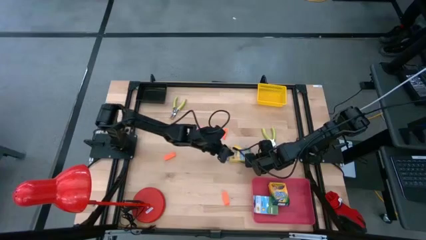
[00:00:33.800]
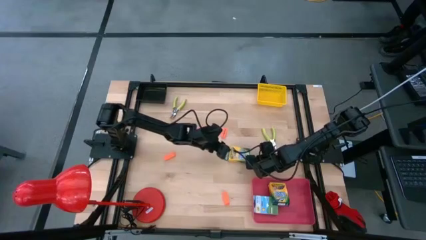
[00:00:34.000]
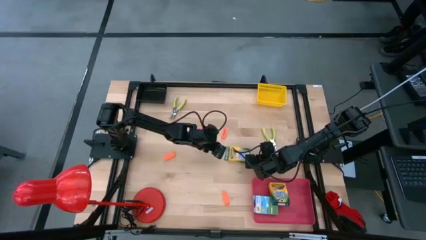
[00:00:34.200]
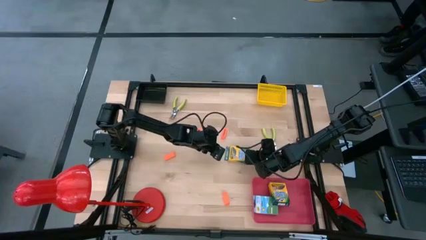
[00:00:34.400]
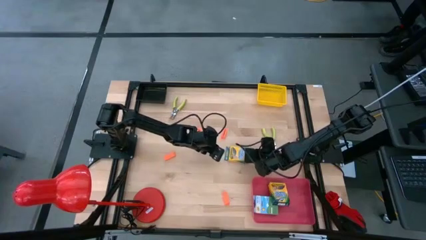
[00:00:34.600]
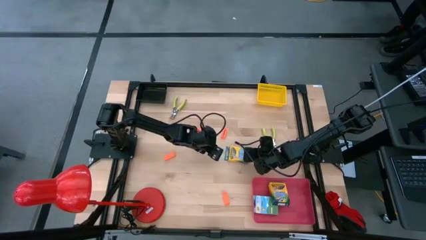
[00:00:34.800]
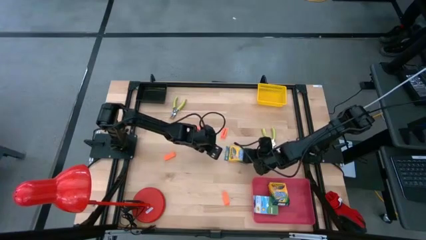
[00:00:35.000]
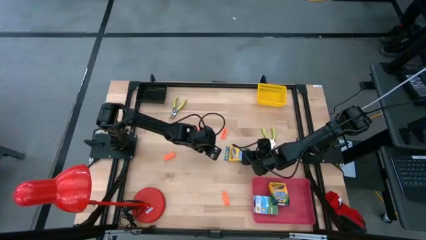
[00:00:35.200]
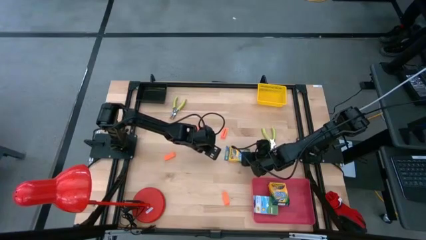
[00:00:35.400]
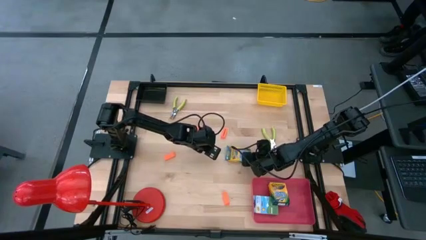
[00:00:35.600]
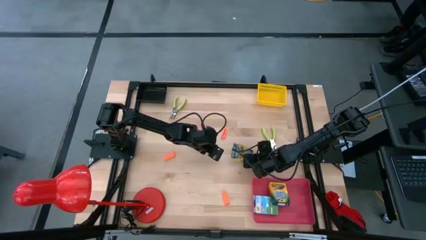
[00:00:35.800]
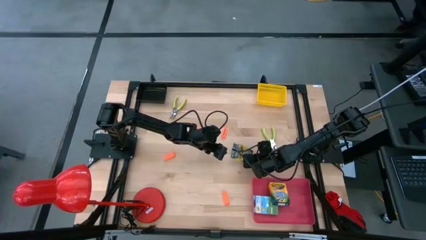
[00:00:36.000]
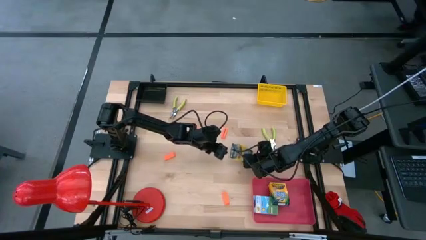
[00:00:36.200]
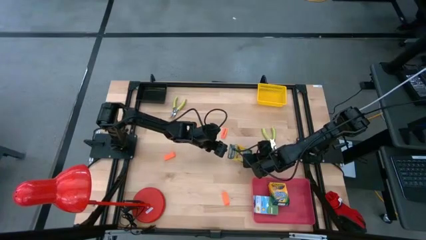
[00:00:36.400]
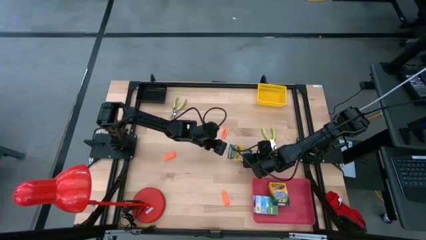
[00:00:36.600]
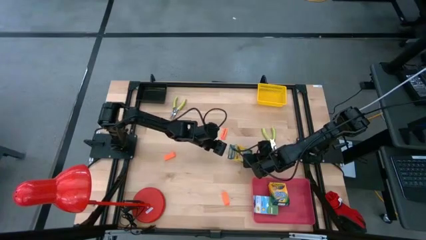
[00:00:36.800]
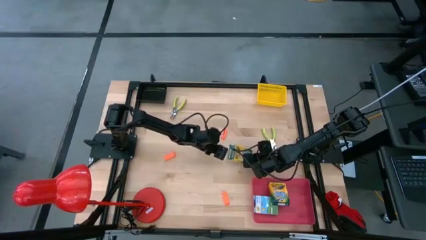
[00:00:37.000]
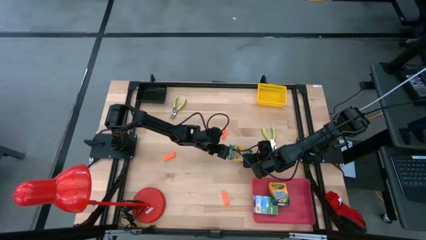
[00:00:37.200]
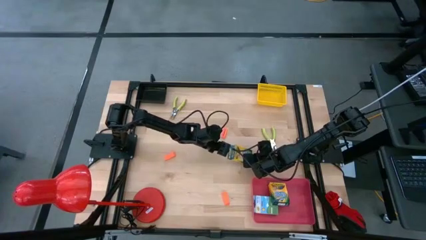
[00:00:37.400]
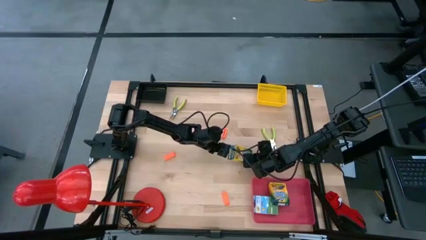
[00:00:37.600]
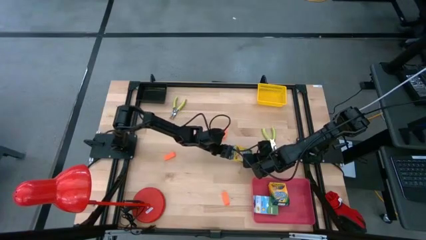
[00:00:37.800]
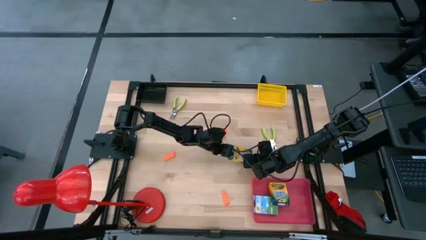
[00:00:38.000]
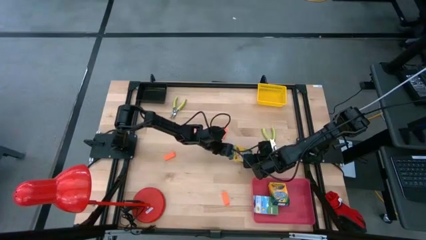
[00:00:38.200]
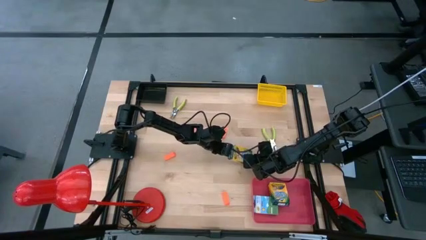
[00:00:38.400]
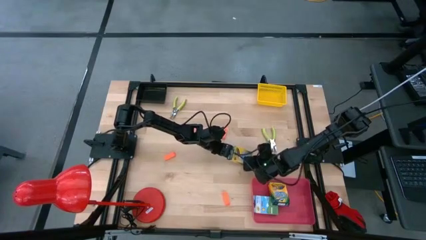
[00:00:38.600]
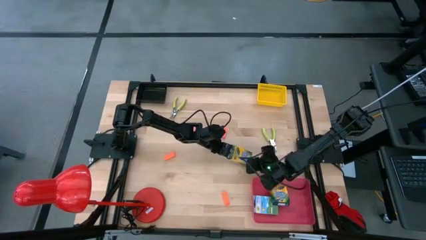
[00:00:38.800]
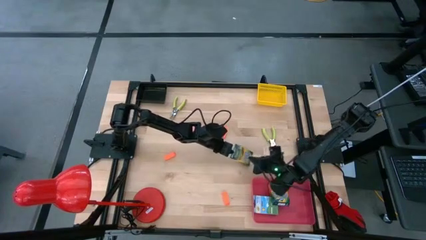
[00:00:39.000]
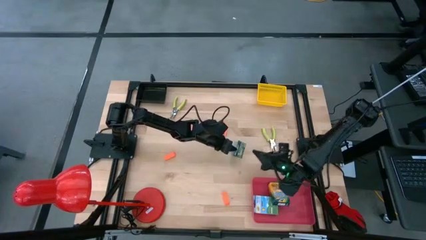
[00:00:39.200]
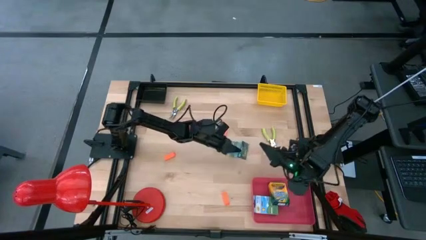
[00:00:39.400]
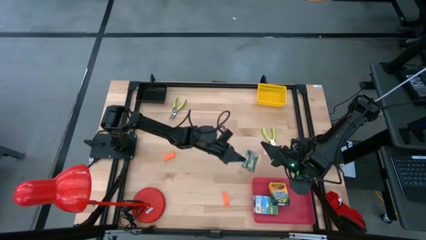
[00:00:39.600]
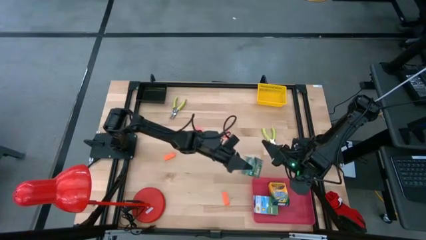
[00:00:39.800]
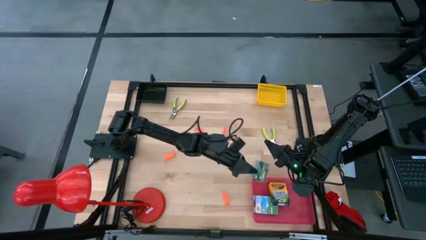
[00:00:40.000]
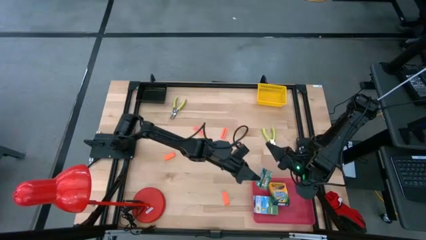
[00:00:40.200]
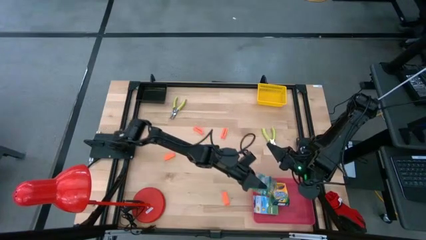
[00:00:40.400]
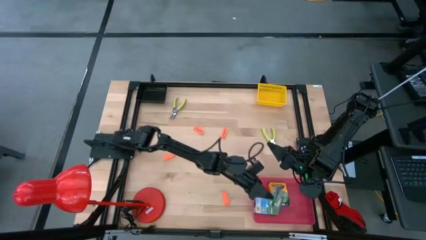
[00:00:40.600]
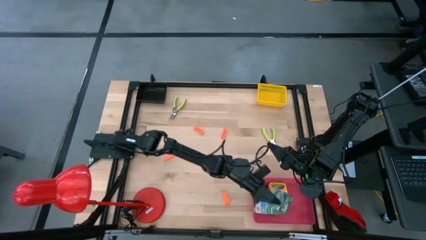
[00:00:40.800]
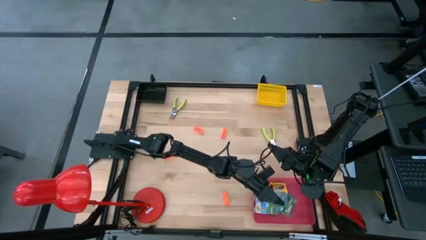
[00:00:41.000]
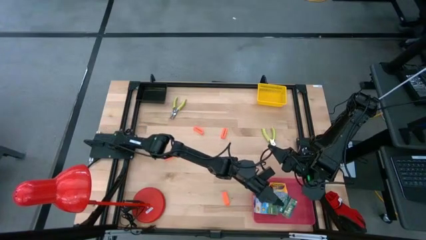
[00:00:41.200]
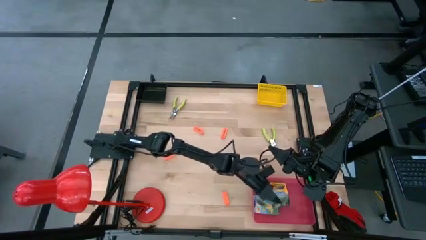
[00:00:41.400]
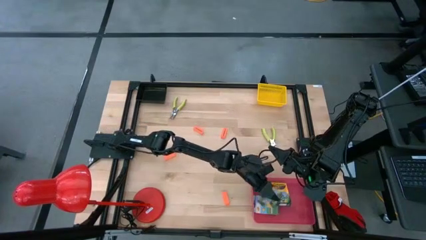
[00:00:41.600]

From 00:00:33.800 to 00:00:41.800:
Task: Pick & Place School Supplies
Put the crayon box into the pink bin

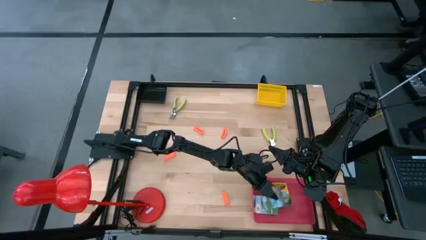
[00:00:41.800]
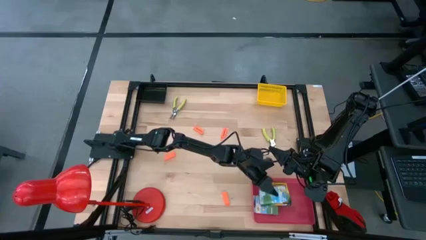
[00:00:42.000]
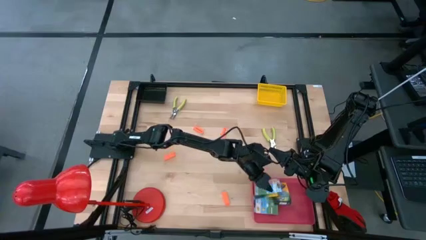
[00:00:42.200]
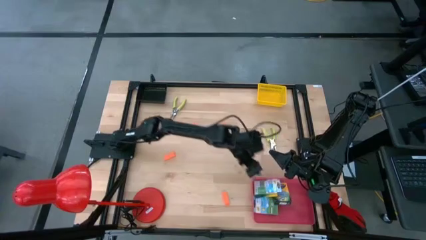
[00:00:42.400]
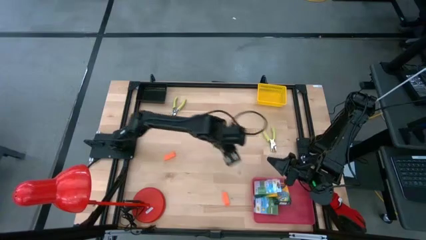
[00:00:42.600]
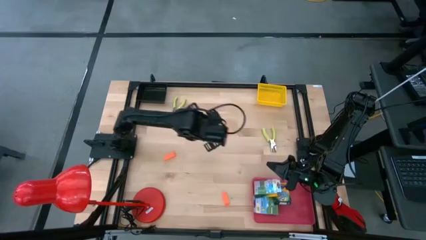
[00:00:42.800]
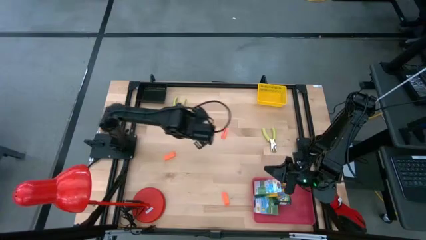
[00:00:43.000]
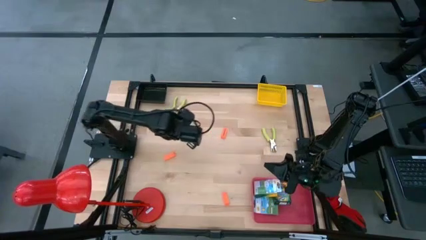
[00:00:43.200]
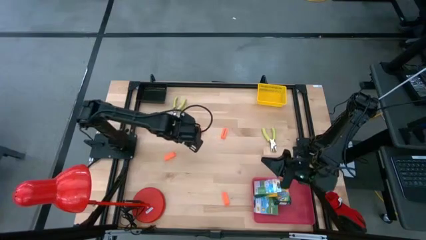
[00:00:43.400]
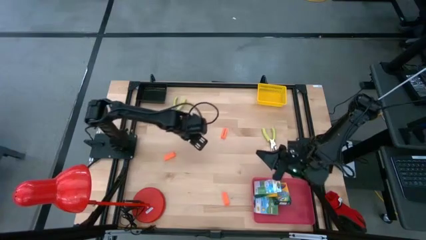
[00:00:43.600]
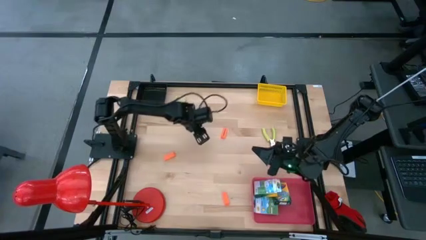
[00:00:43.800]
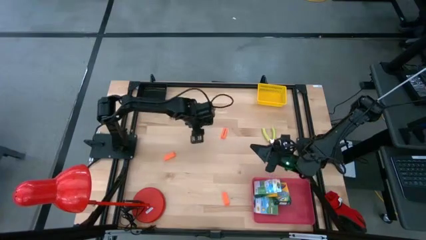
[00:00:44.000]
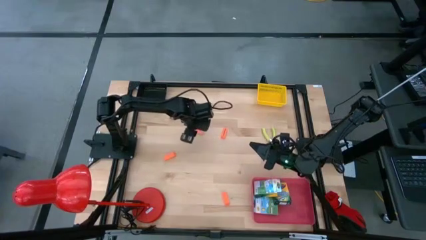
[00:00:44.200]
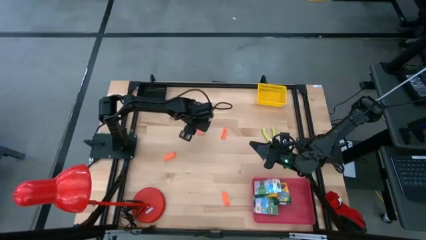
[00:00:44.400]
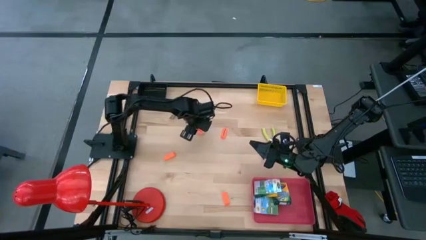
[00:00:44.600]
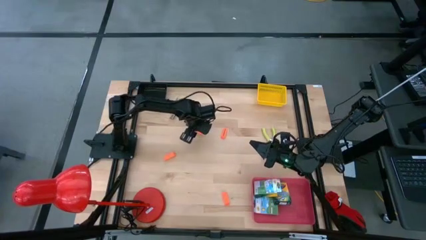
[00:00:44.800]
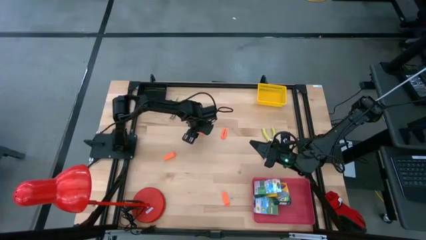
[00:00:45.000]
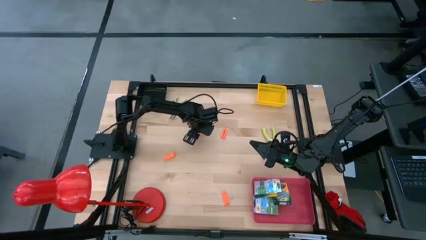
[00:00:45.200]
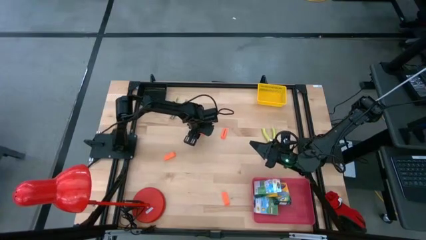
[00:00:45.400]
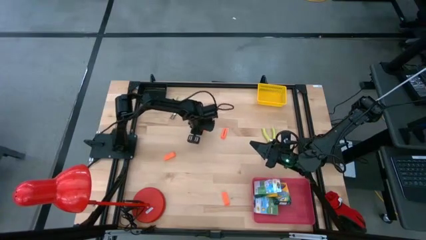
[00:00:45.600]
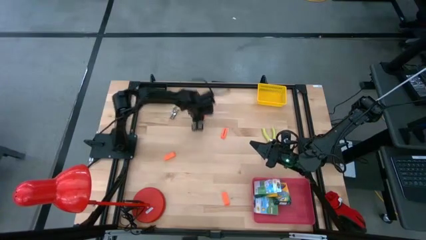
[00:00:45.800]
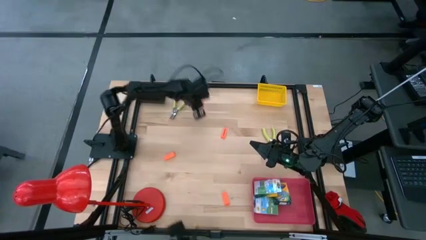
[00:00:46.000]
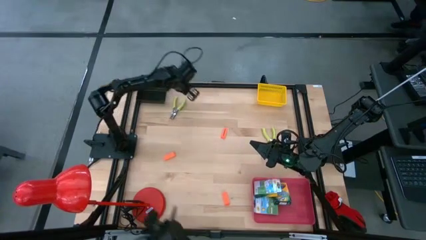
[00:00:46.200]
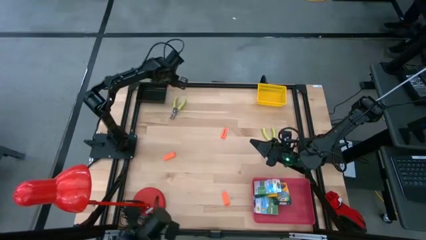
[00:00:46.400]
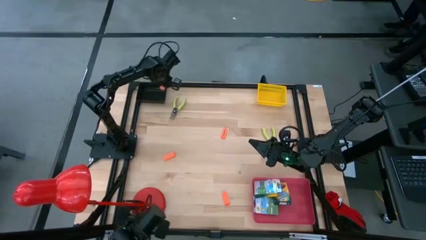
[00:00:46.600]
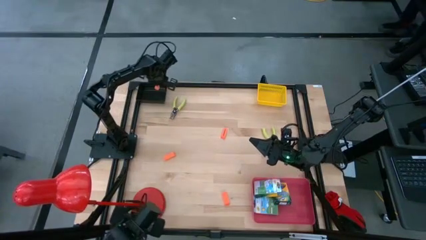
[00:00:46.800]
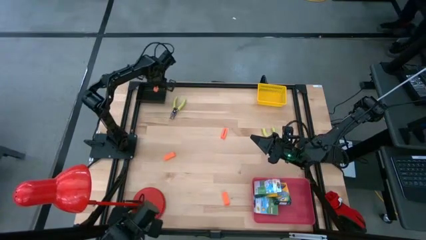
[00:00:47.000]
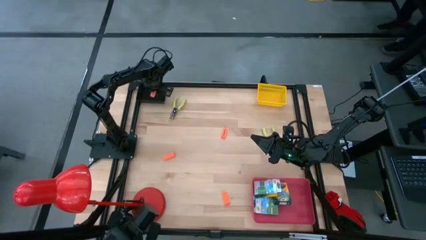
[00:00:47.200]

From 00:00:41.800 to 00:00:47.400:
Put the orange eraser into the black bin

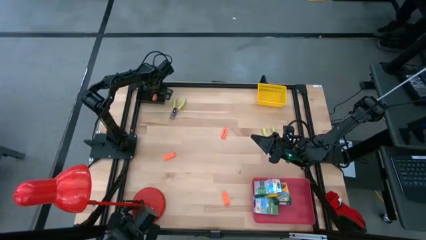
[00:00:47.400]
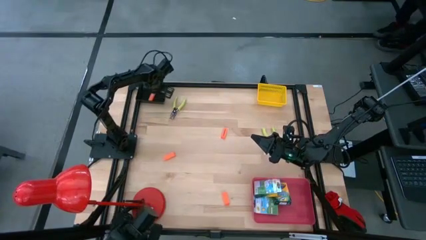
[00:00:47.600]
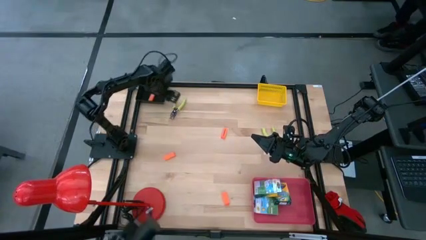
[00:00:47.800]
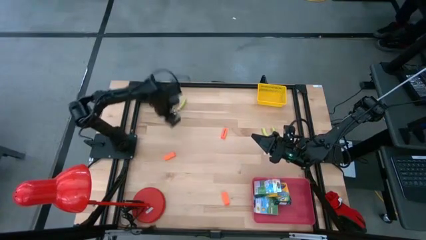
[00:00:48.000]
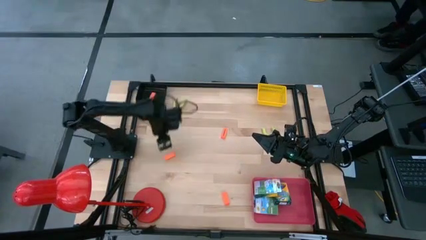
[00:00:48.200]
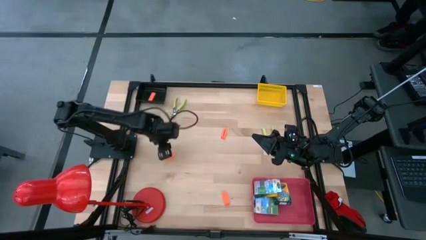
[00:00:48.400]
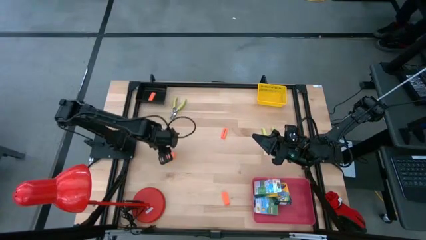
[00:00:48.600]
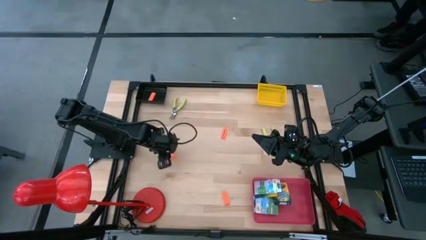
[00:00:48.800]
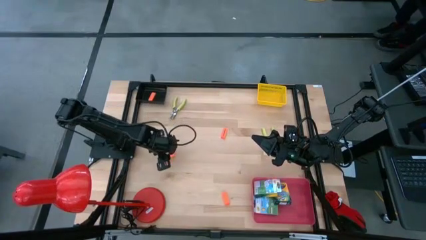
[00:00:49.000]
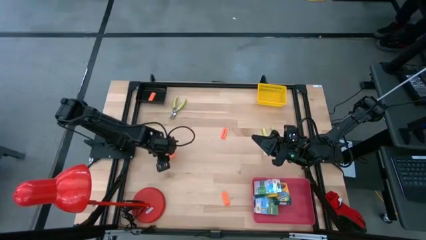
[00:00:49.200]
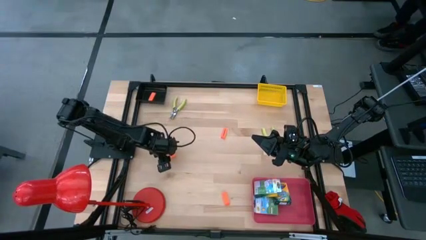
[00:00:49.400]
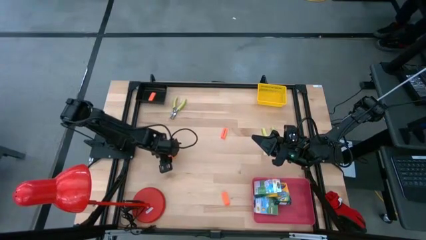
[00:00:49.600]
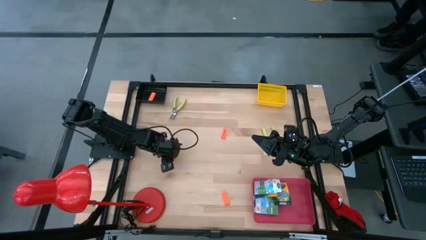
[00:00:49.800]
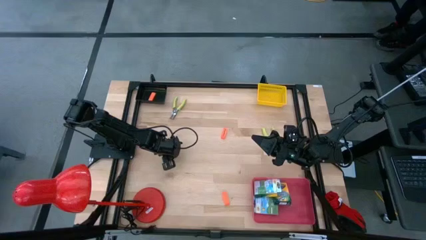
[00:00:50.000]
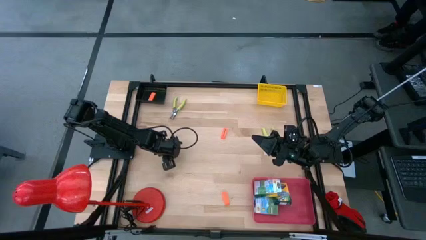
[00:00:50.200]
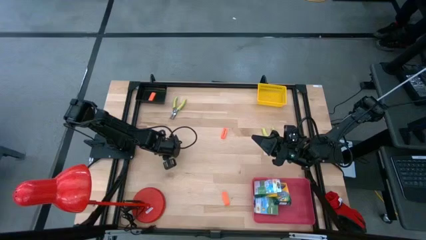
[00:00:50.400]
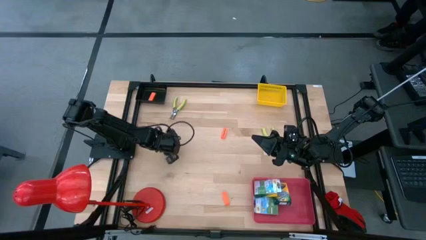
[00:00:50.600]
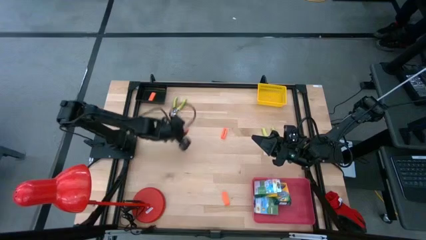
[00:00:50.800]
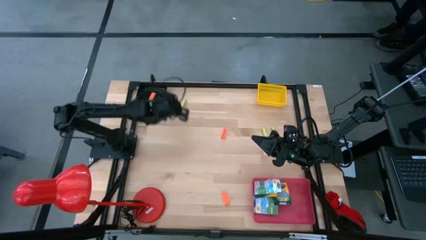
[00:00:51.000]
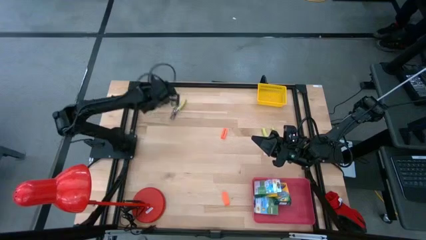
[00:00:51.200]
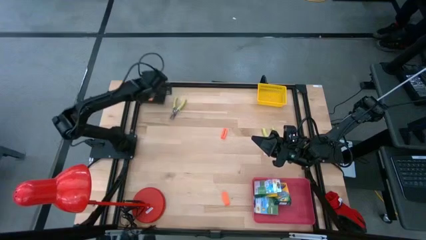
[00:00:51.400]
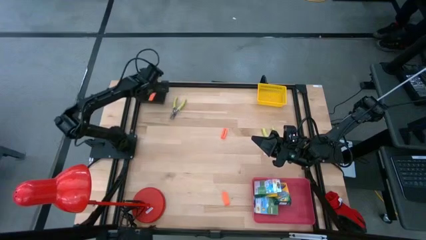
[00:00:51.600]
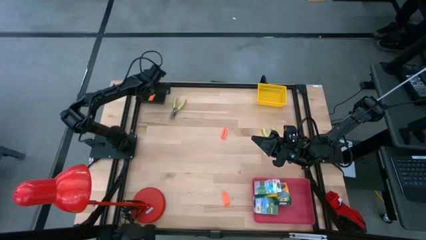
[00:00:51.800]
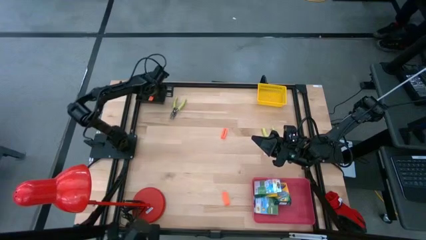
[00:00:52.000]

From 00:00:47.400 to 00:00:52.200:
Put the orange eraser into the black bin
